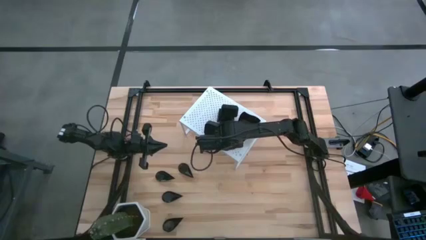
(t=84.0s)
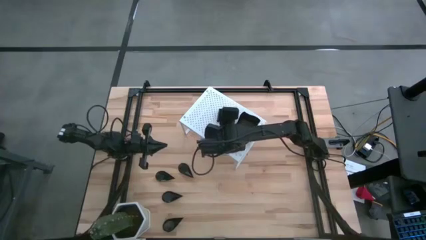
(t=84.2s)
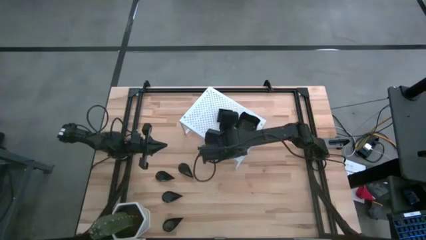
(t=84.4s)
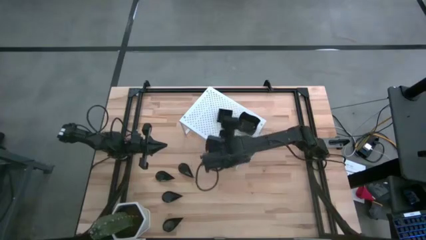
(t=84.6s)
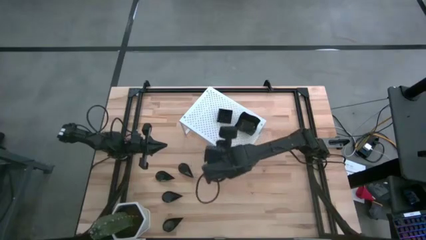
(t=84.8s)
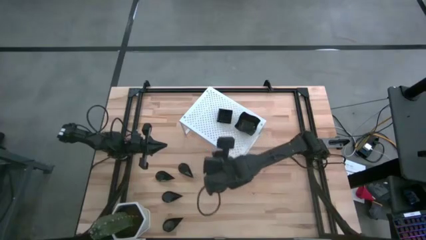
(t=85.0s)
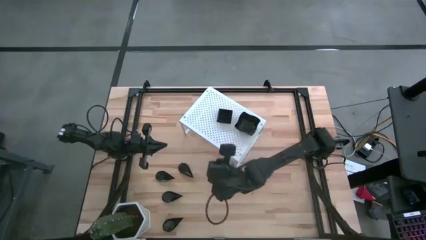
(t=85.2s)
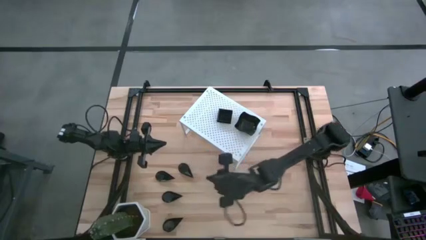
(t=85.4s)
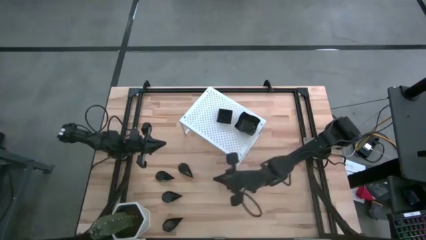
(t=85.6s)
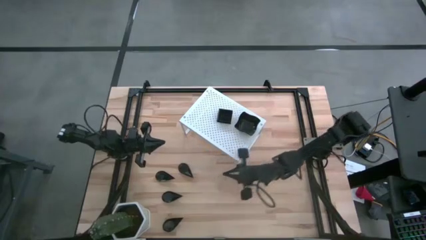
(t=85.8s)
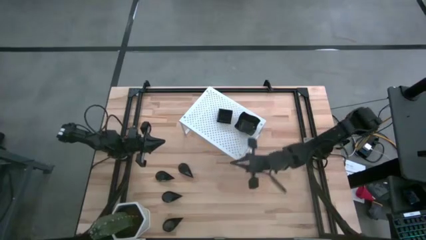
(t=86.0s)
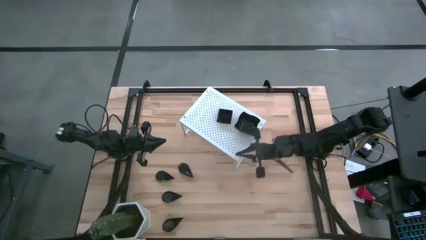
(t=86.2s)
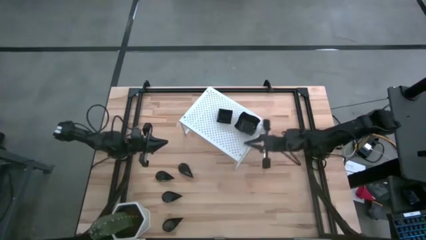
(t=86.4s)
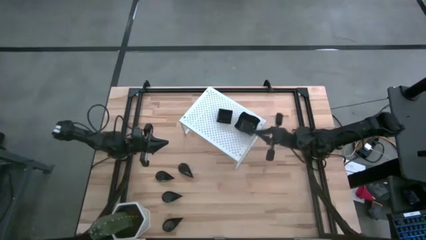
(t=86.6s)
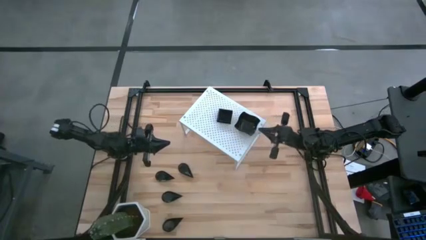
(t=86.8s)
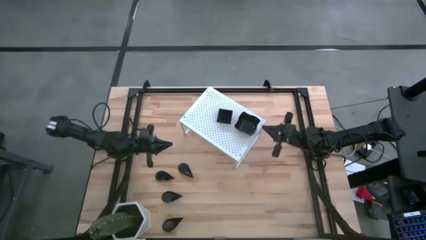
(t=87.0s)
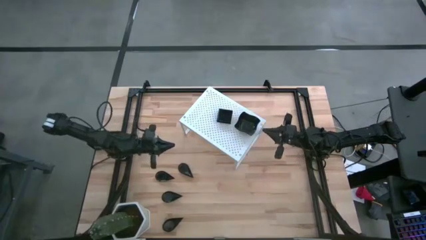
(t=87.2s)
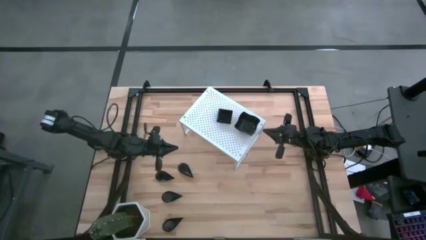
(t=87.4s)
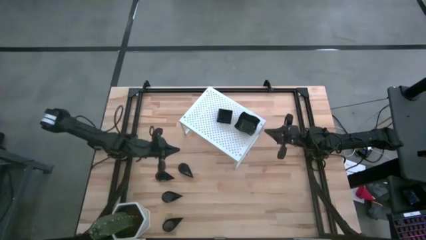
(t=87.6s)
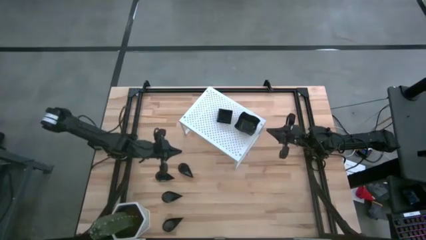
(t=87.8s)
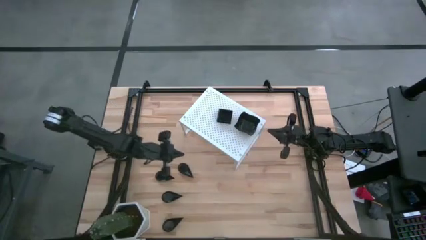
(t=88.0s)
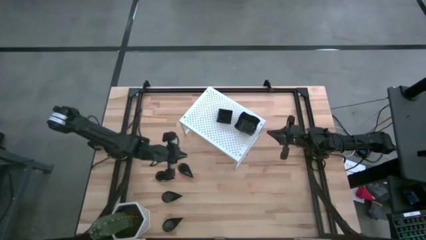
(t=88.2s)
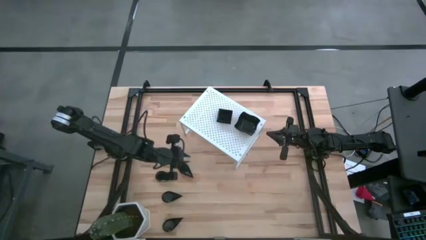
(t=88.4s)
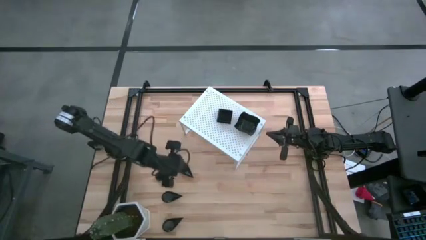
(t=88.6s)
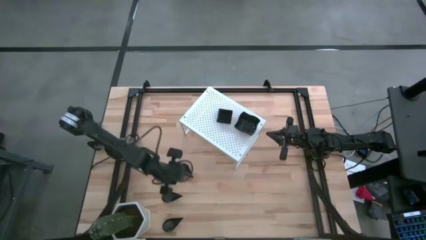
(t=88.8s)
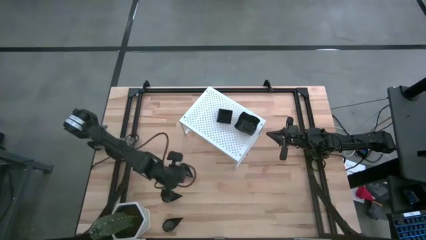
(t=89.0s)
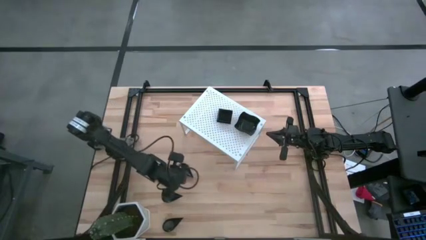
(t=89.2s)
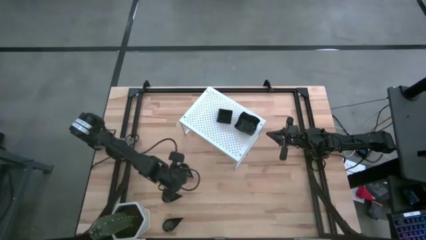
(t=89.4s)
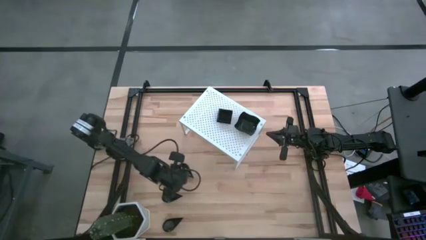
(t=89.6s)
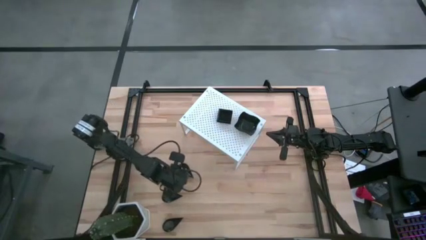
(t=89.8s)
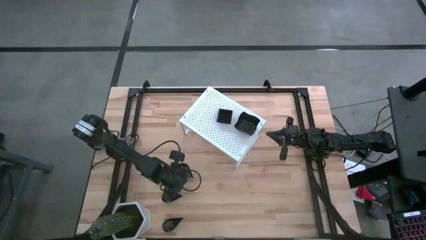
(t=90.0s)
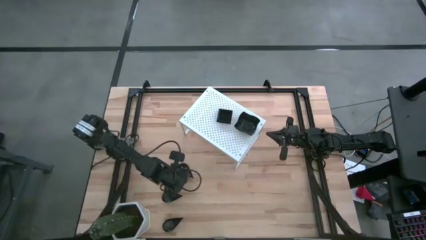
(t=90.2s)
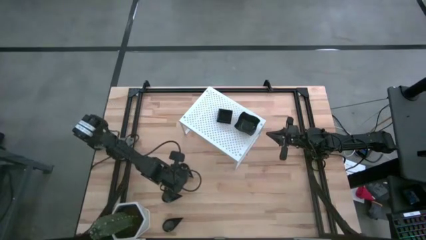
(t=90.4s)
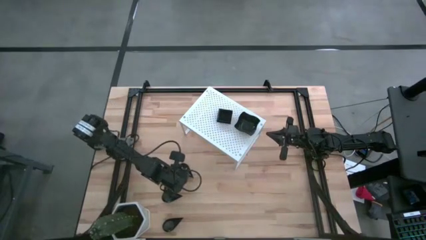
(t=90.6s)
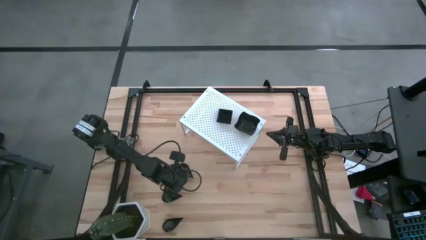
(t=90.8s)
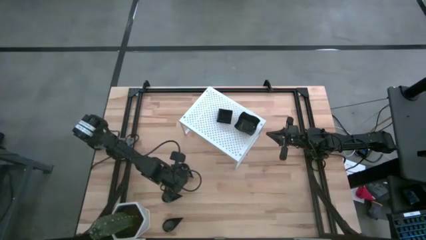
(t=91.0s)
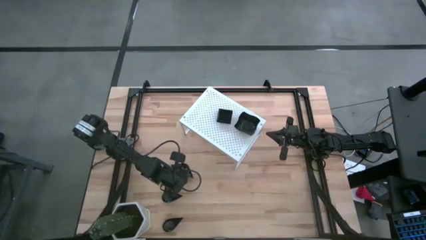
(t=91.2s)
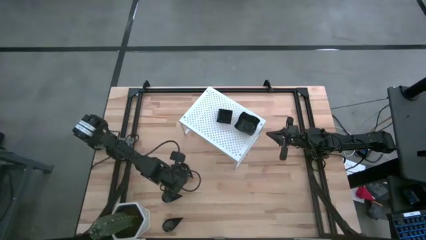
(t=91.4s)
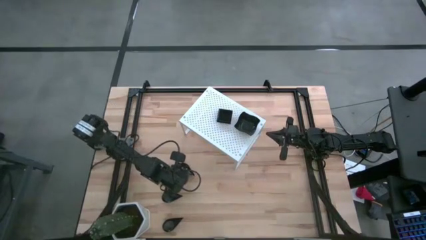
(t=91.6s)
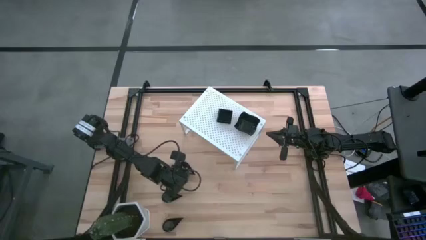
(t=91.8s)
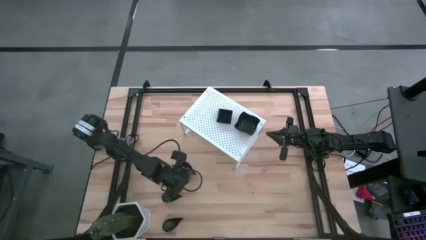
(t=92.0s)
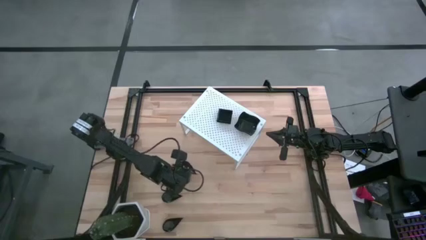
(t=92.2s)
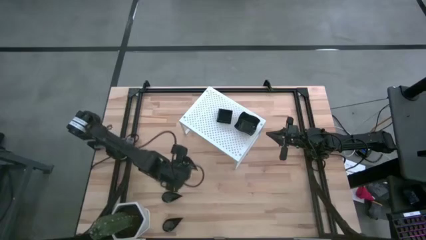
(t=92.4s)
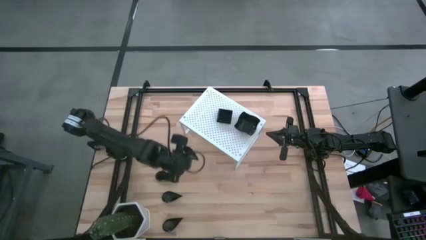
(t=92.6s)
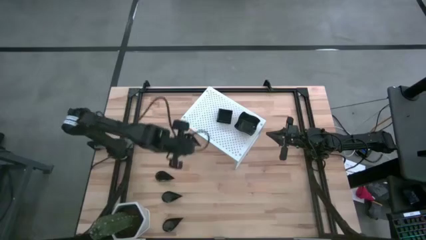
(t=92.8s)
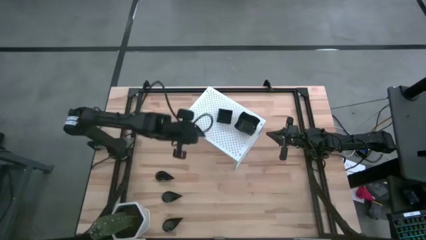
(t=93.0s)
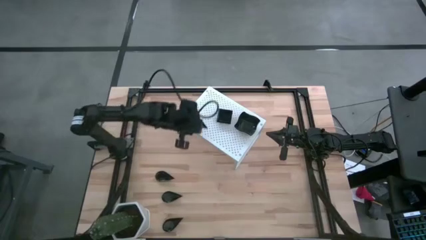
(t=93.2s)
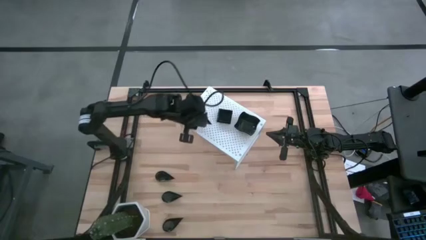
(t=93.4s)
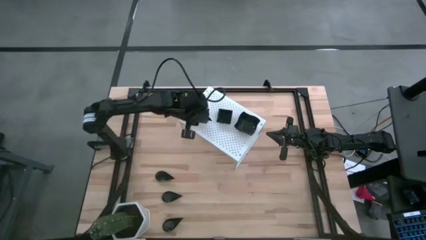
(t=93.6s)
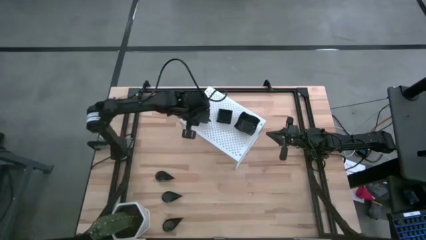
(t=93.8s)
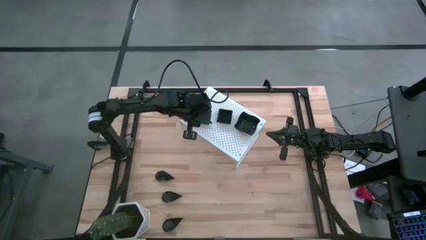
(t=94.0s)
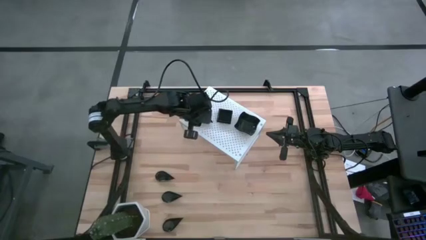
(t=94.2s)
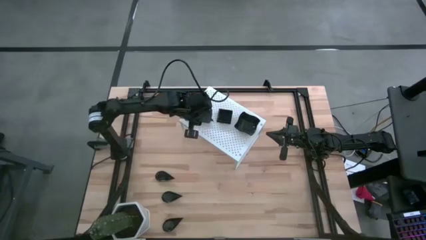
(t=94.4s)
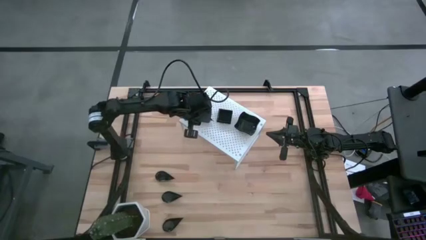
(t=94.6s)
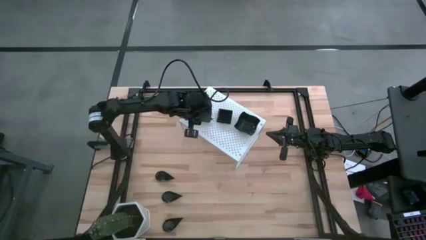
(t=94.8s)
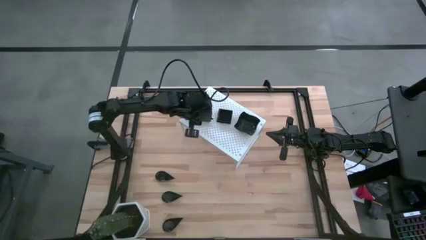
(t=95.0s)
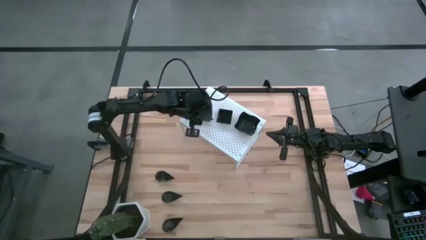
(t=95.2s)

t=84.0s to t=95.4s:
Task: Pick & Place Mini shaped plates
Put the drop-shaped plate on the shelf
